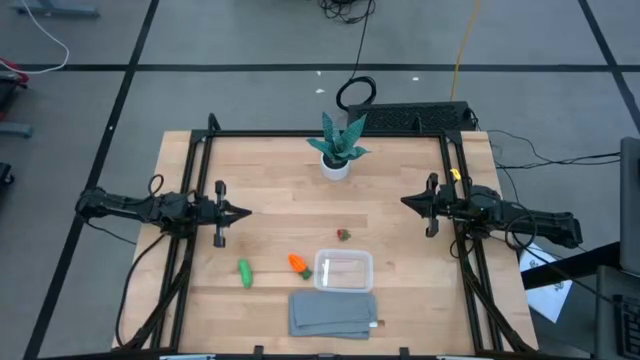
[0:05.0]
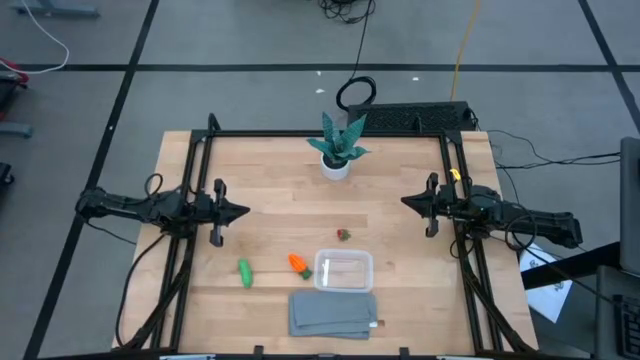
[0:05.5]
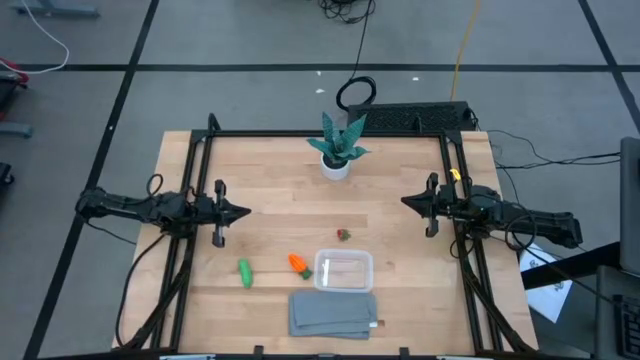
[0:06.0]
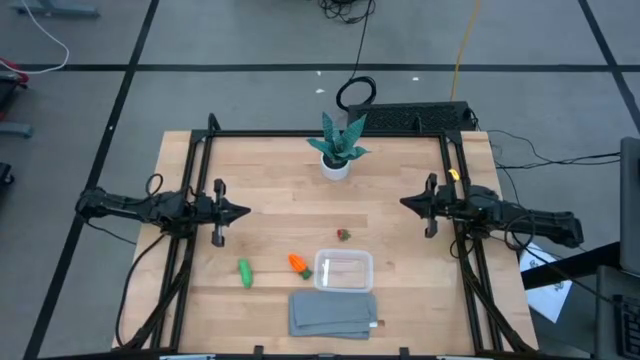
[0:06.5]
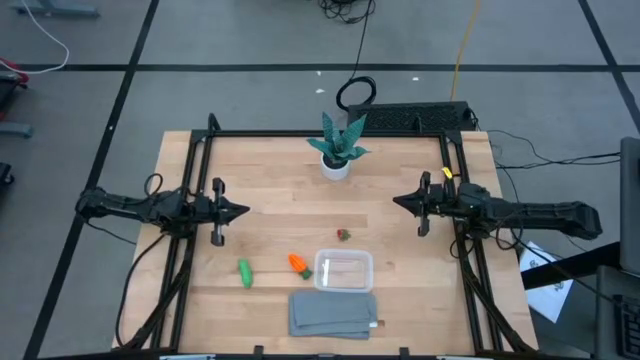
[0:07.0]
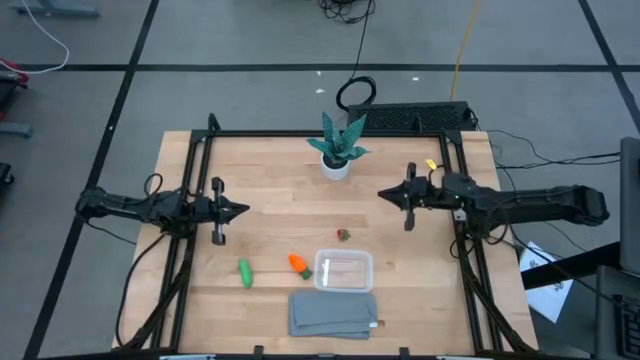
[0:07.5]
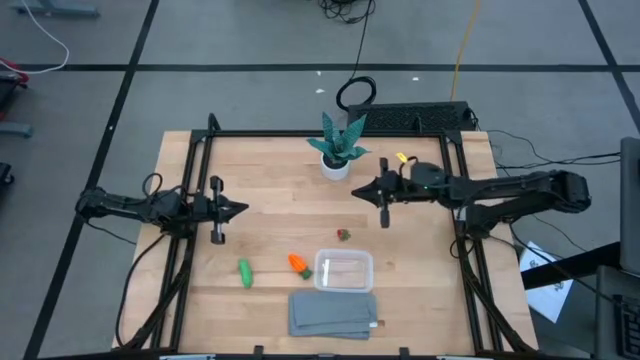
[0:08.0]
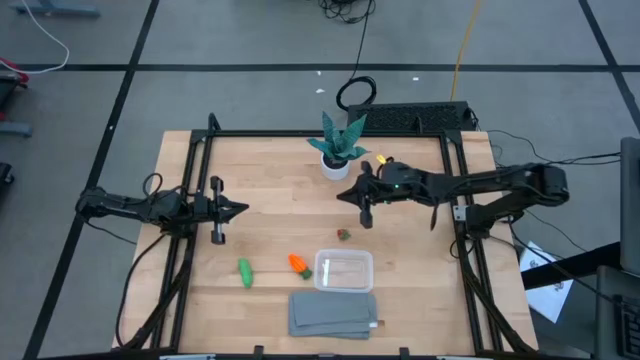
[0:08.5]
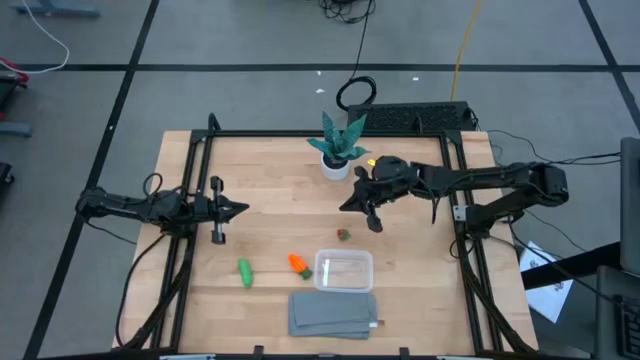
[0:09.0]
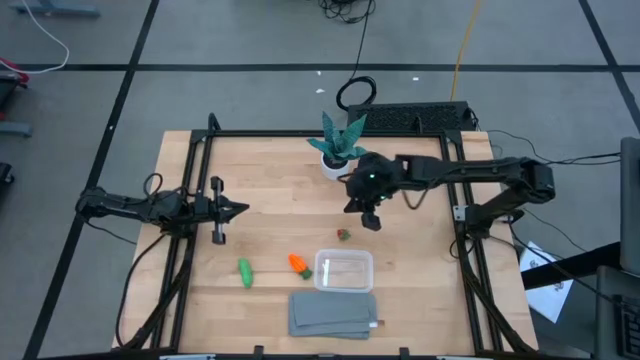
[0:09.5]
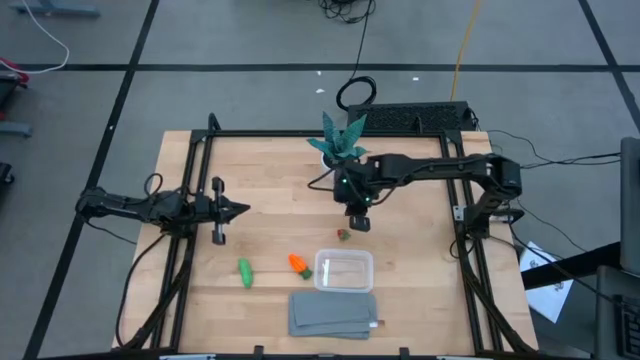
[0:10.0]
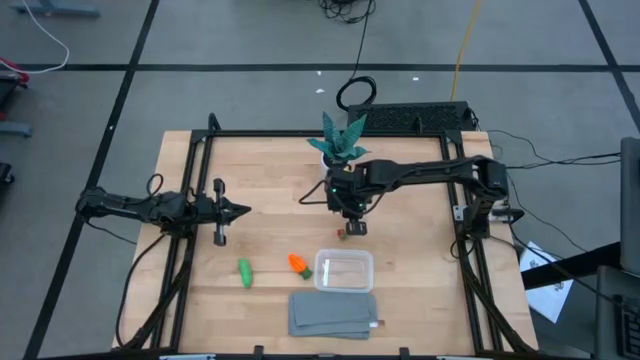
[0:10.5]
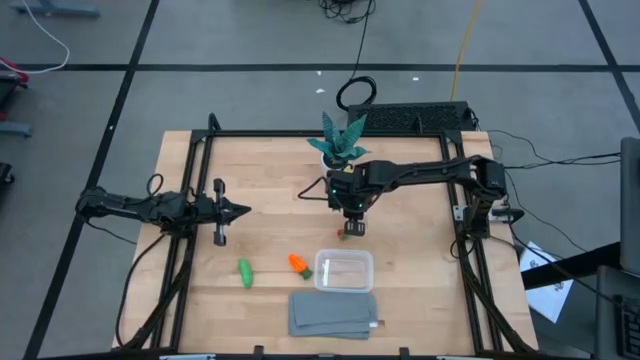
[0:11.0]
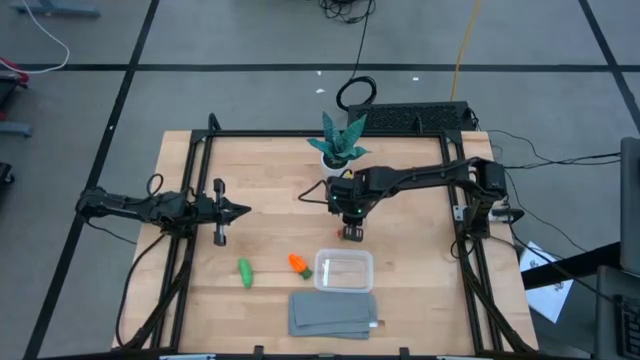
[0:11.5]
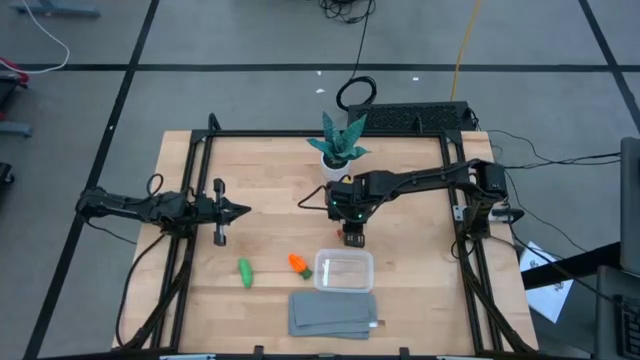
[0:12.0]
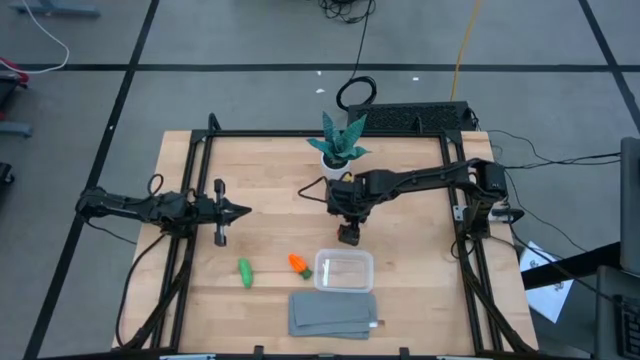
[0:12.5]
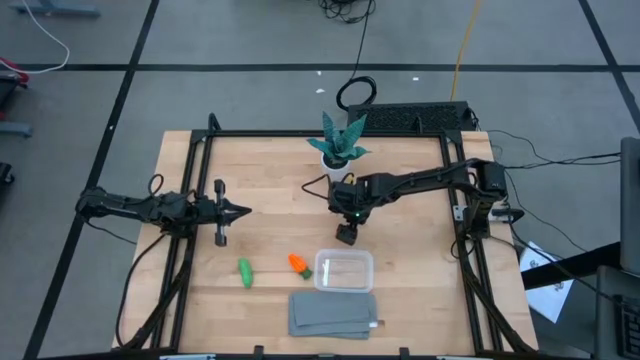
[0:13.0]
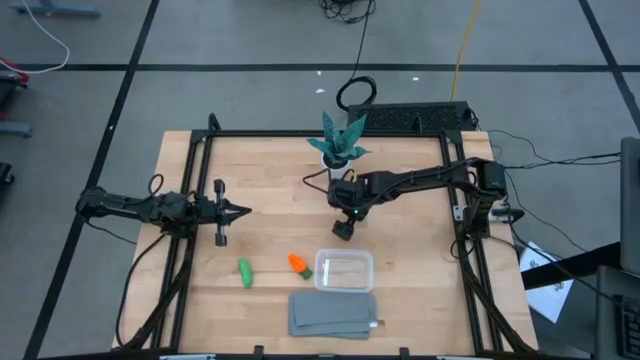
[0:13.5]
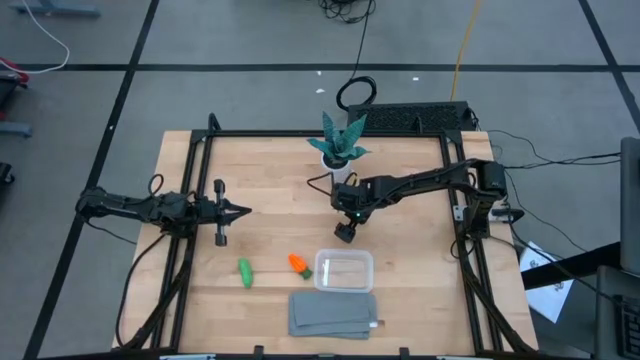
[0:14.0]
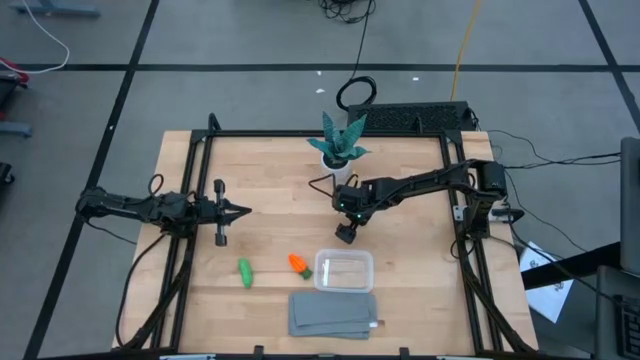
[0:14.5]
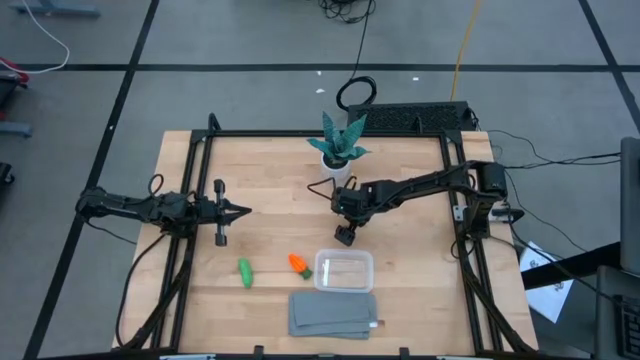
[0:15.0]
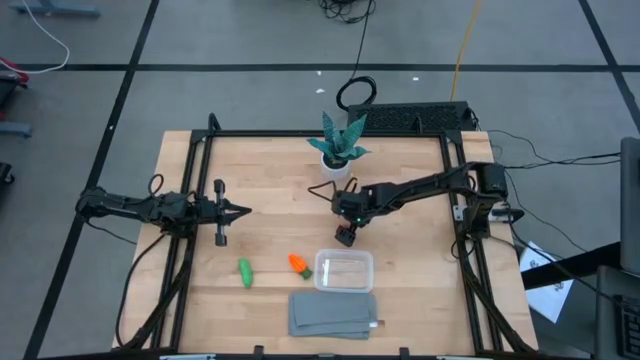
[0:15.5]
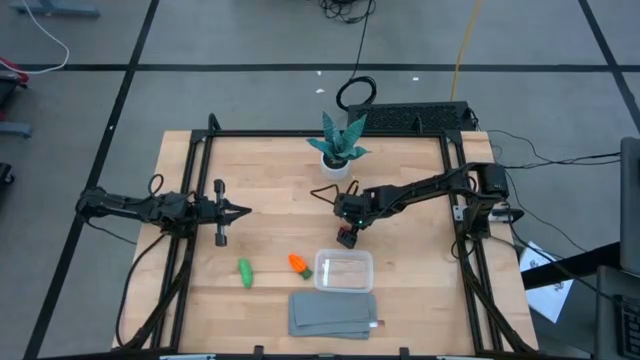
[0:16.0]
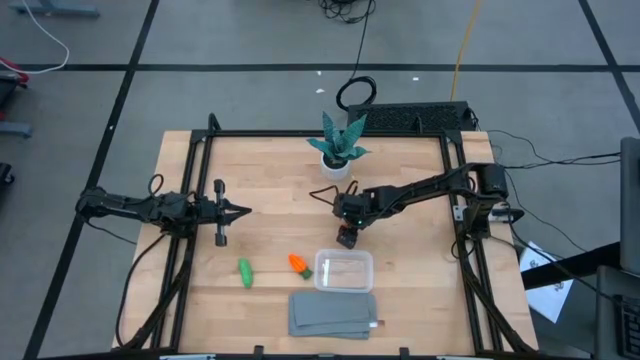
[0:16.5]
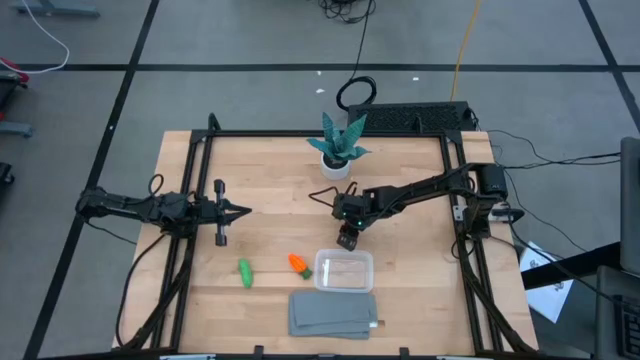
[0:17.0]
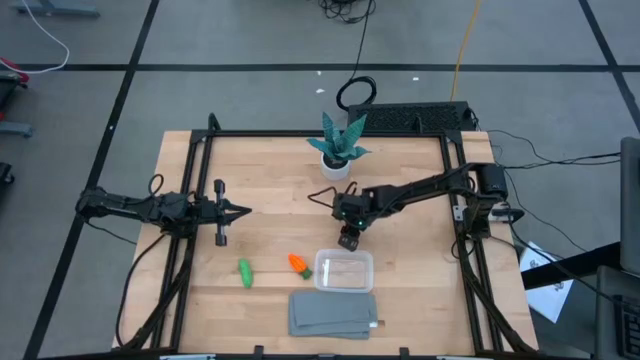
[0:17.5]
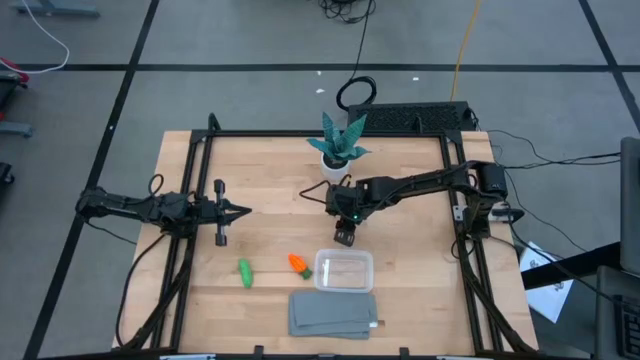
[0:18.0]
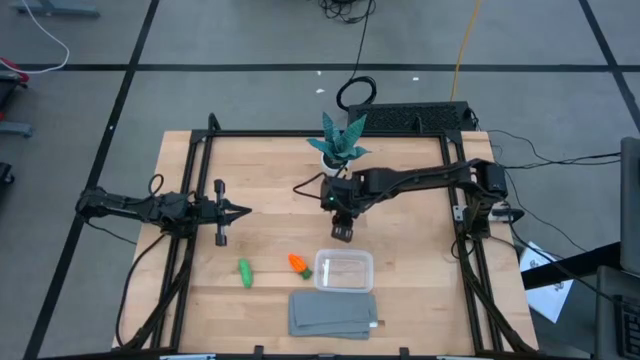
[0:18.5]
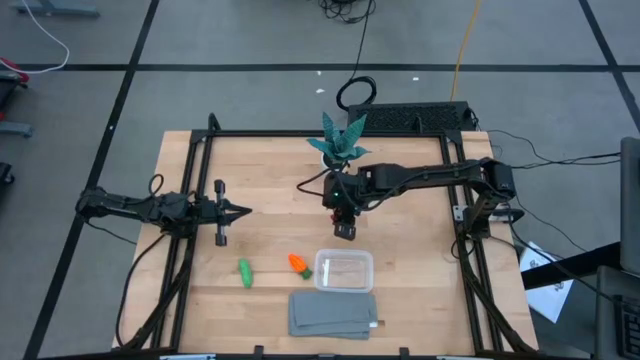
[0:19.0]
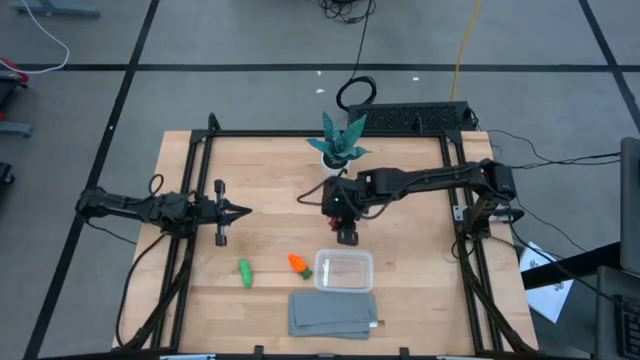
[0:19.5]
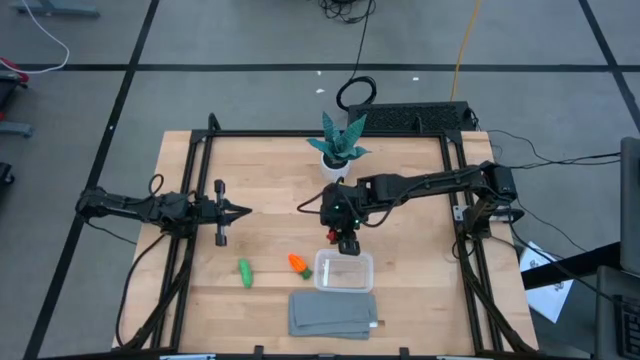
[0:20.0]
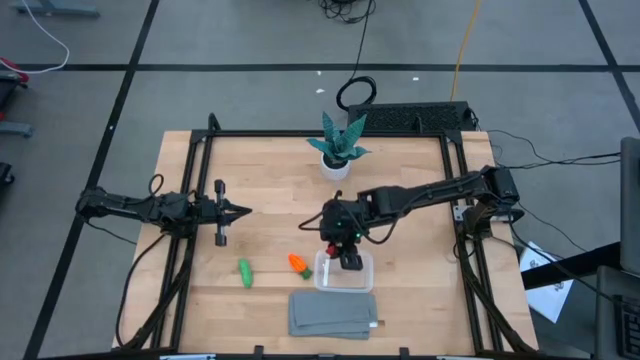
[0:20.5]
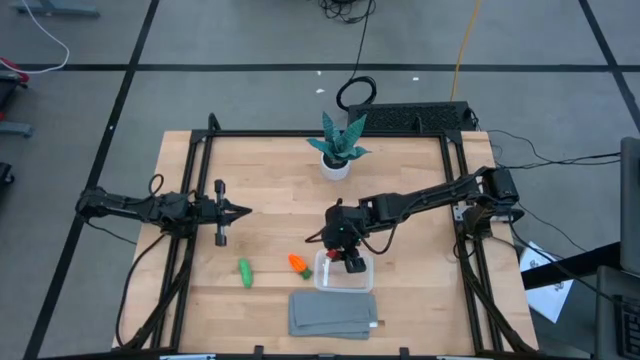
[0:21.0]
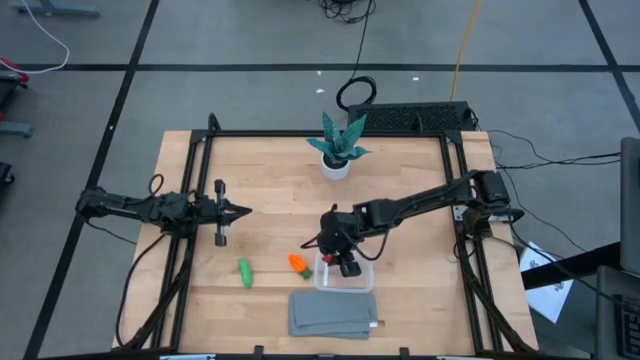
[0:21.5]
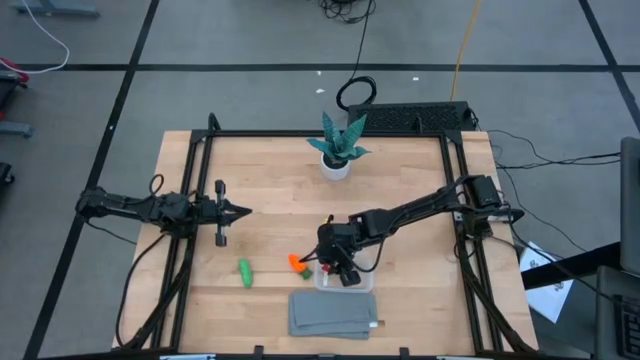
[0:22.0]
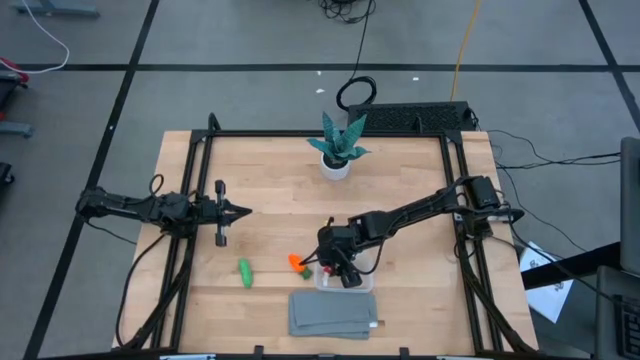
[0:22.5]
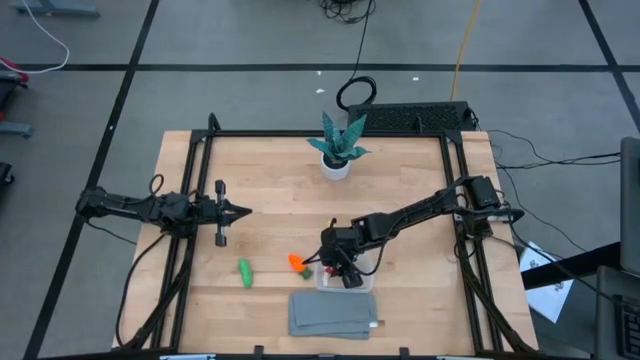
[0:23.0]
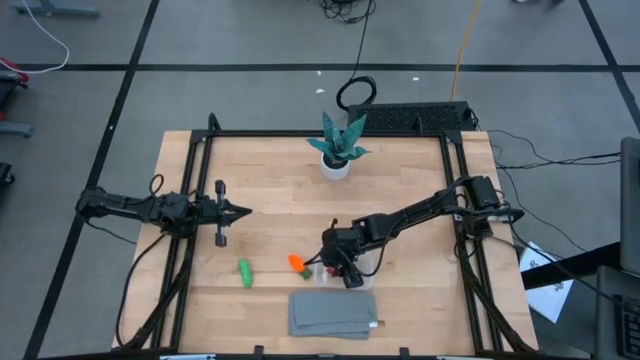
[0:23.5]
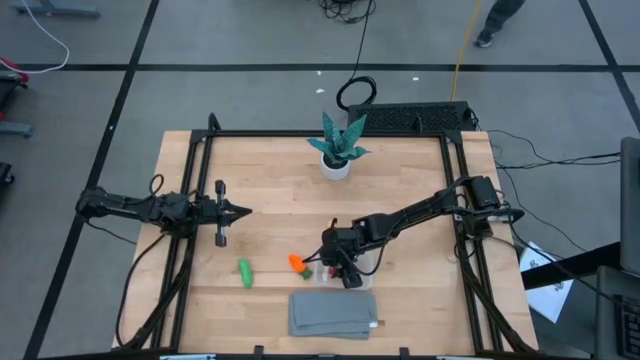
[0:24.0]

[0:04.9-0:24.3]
Task: Pick and placing Produce into tupperware
Put the red strawberry into the container
